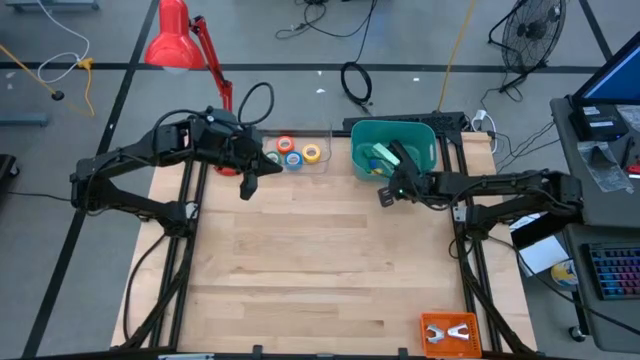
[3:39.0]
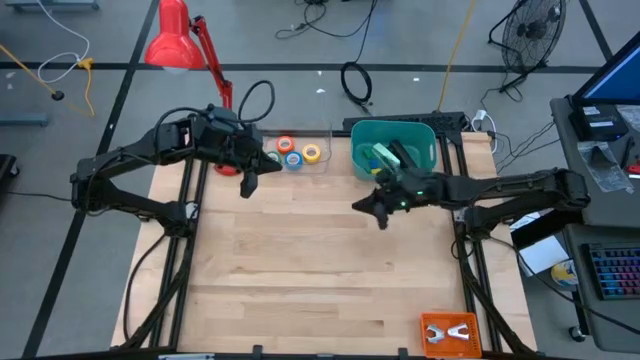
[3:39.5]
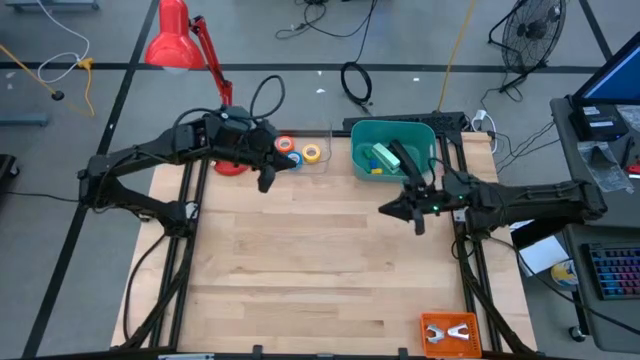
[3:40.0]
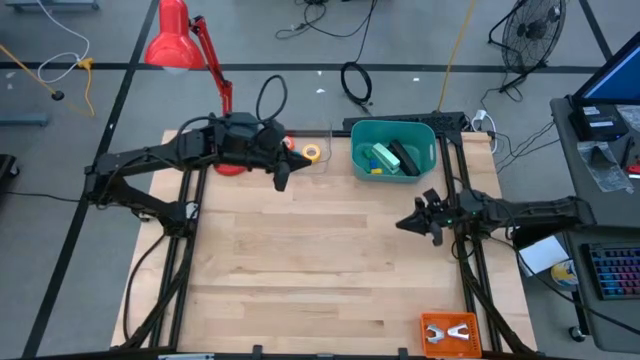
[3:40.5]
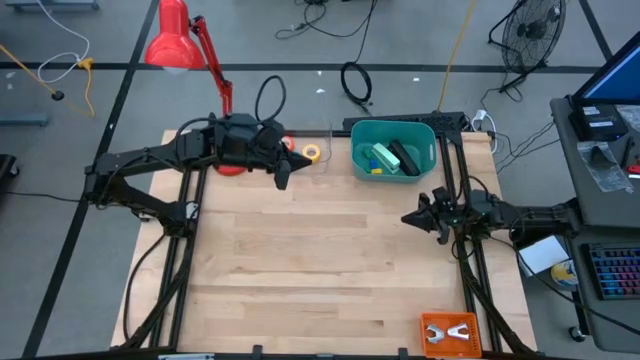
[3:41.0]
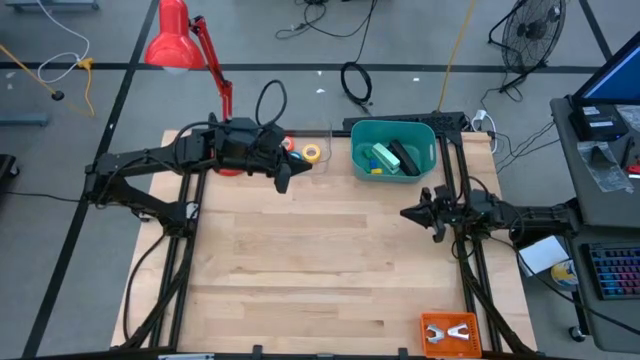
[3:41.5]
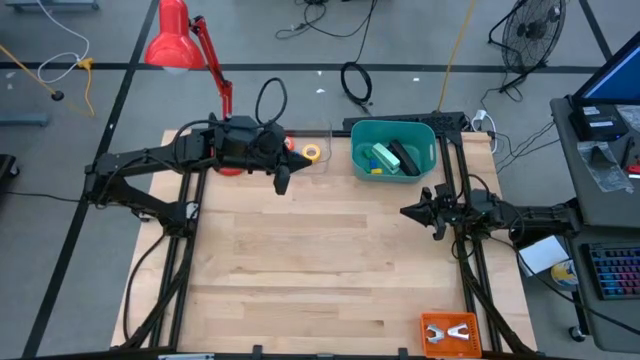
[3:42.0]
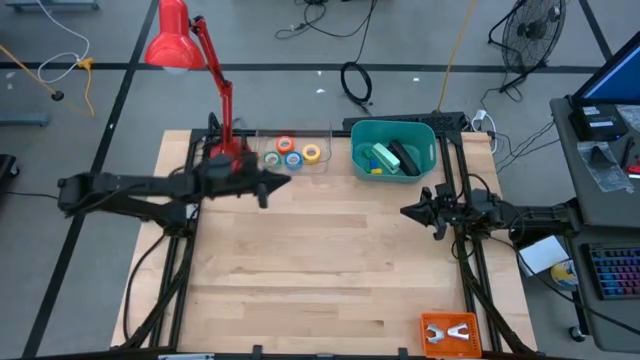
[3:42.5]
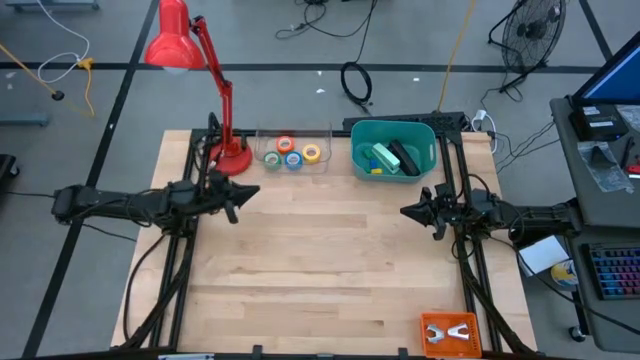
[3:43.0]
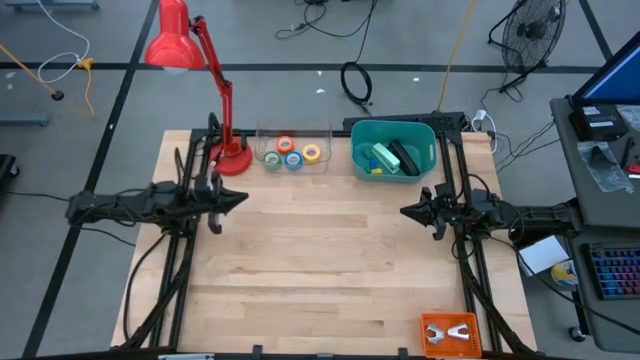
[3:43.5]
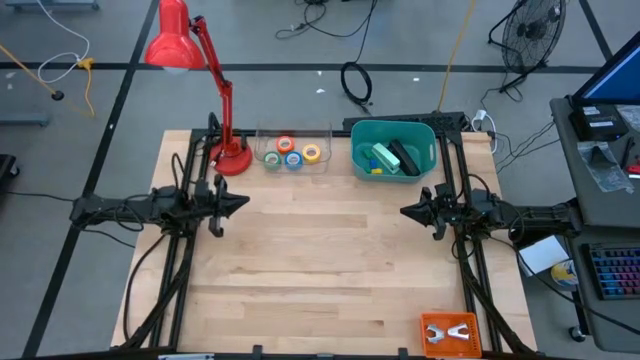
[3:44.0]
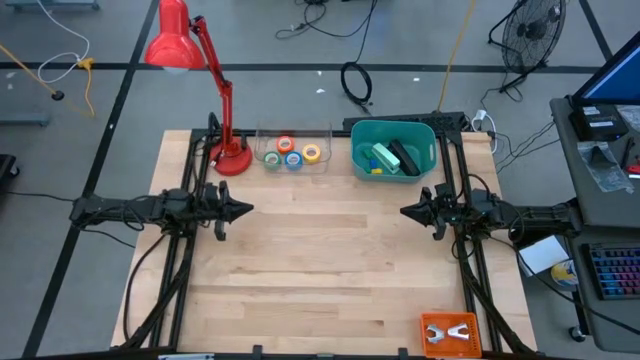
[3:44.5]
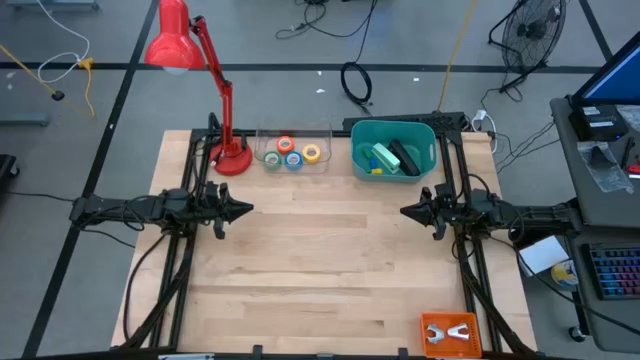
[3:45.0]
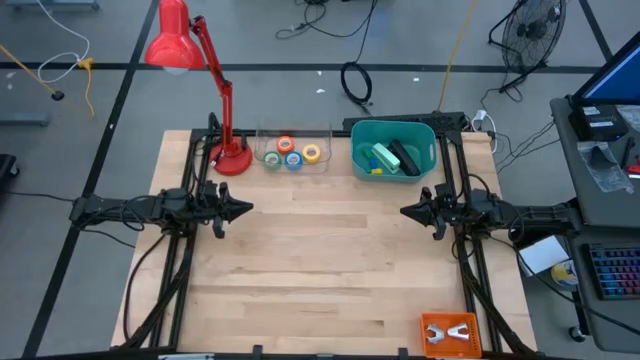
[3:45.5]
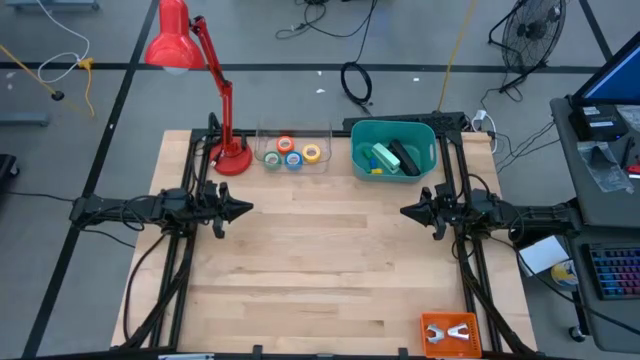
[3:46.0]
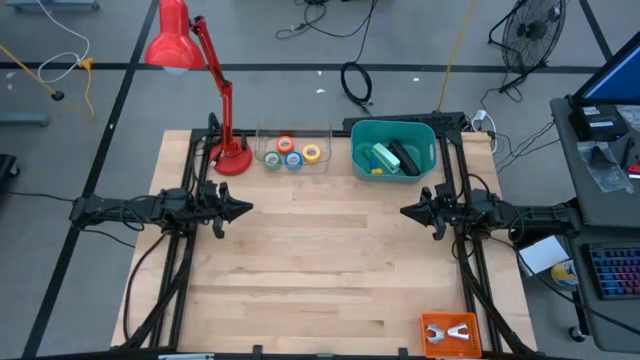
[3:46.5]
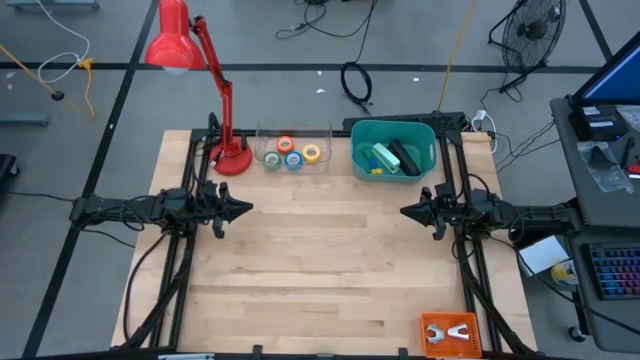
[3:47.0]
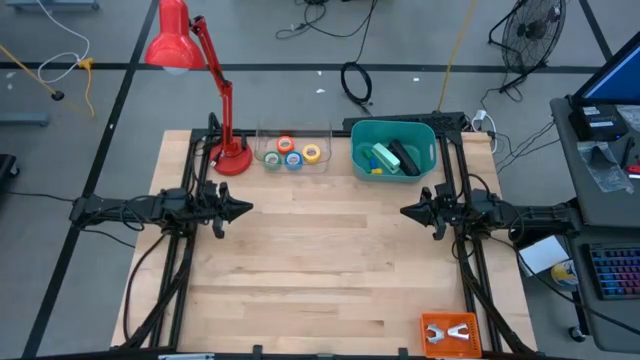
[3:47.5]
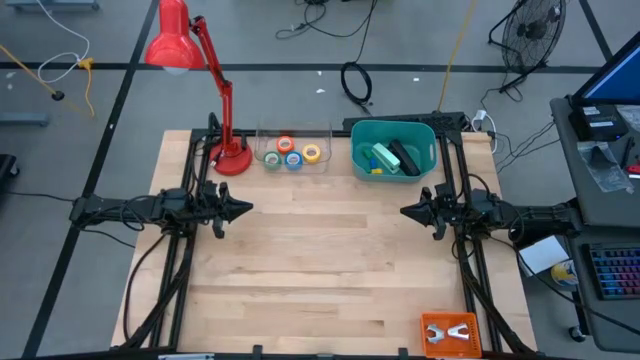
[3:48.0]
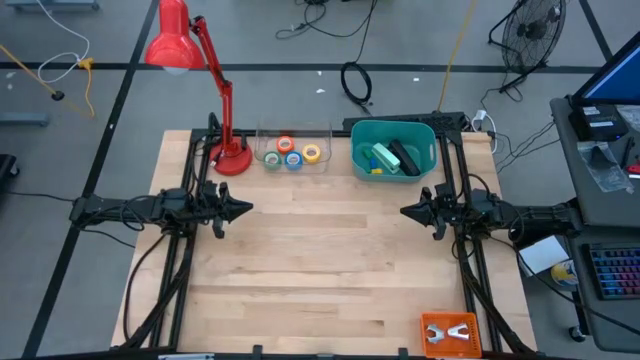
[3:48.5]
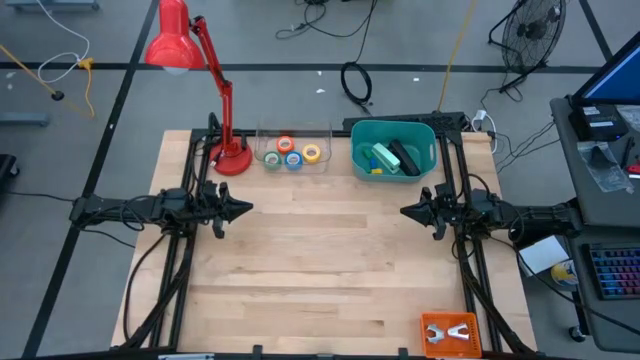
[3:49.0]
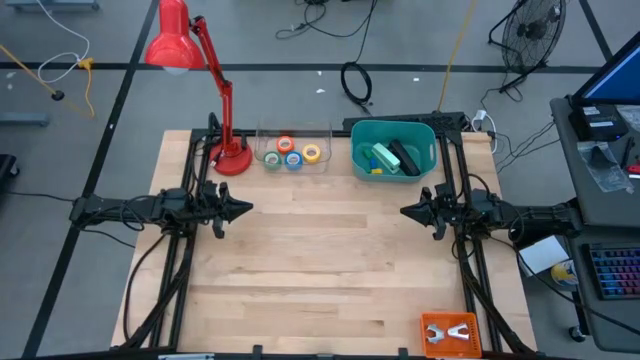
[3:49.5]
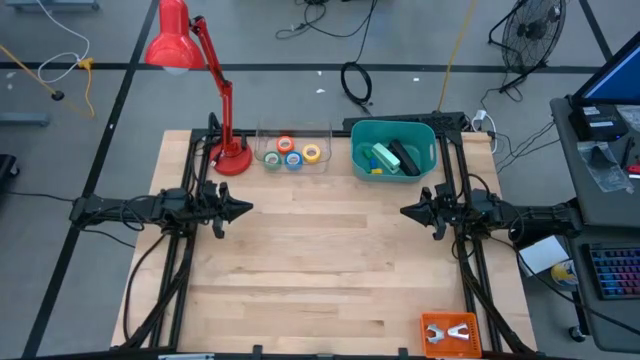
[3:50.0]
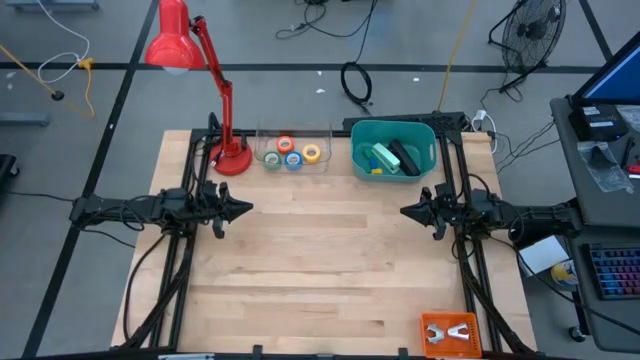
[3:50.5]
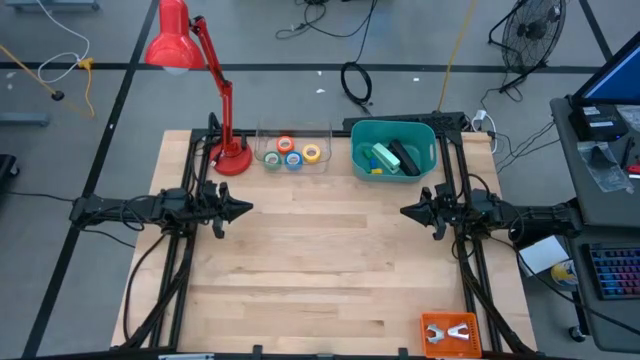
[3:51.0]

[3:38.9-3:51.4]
Task: Pick and place Stapler, Stapler remover, tape
Return to Home Position

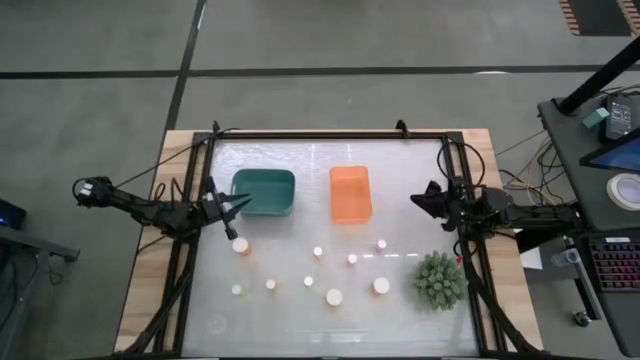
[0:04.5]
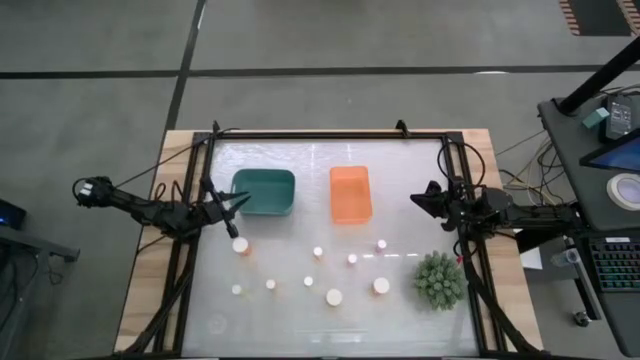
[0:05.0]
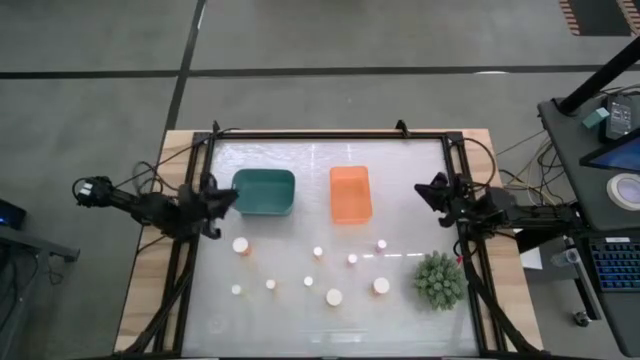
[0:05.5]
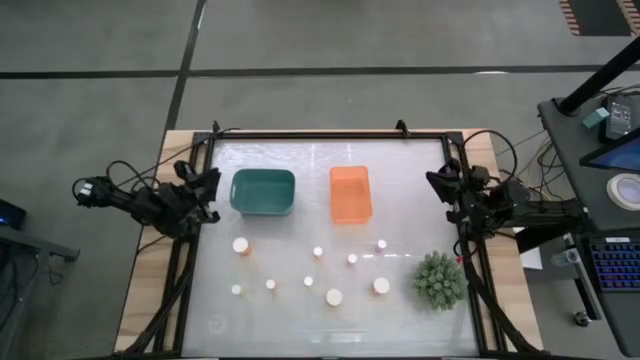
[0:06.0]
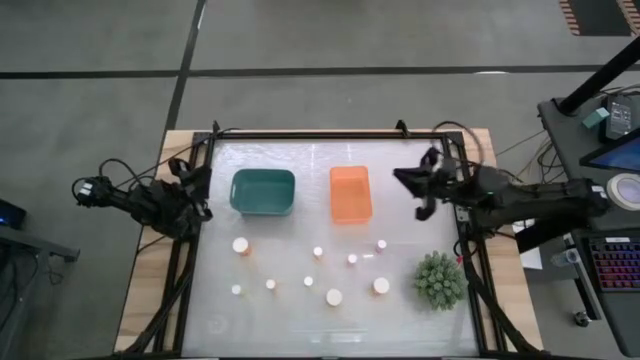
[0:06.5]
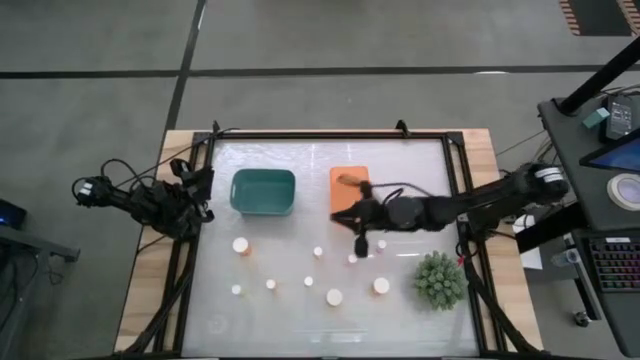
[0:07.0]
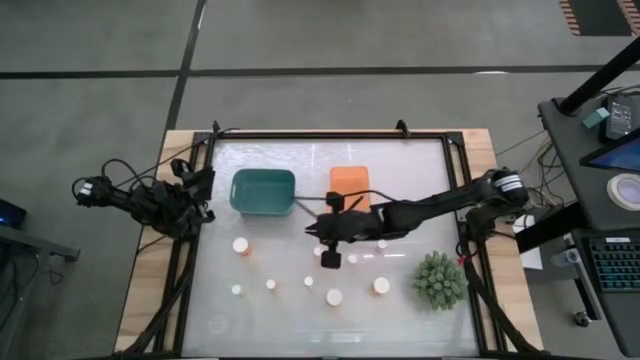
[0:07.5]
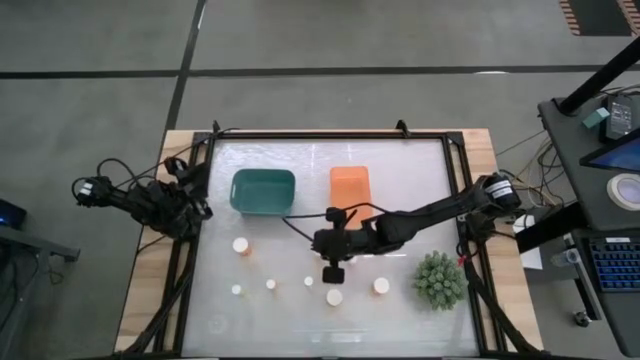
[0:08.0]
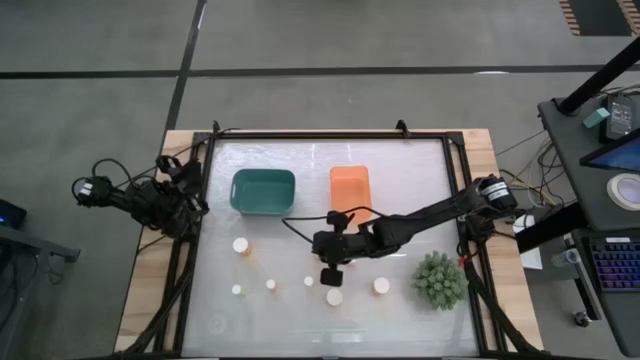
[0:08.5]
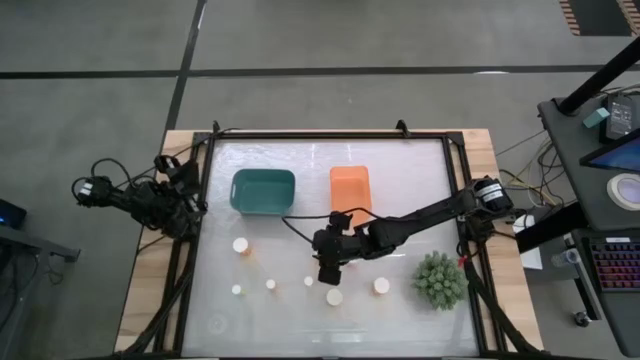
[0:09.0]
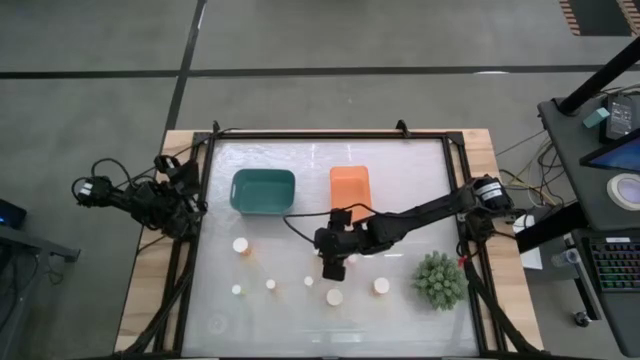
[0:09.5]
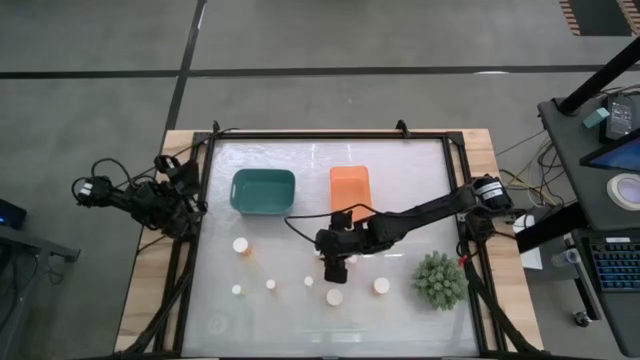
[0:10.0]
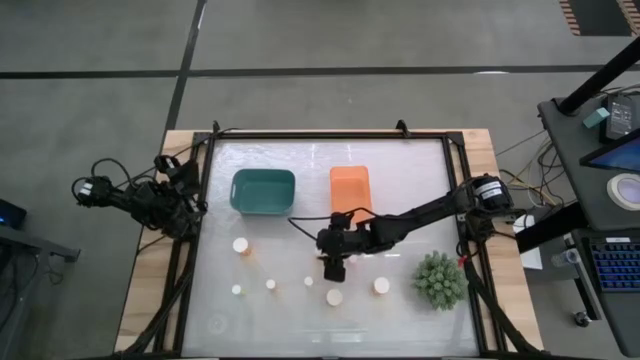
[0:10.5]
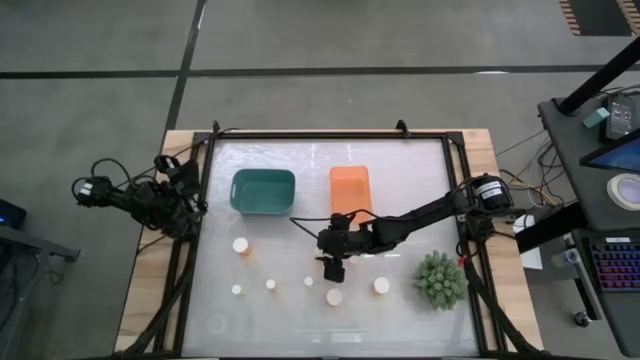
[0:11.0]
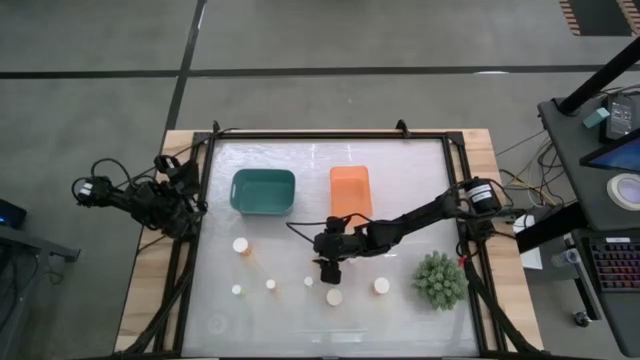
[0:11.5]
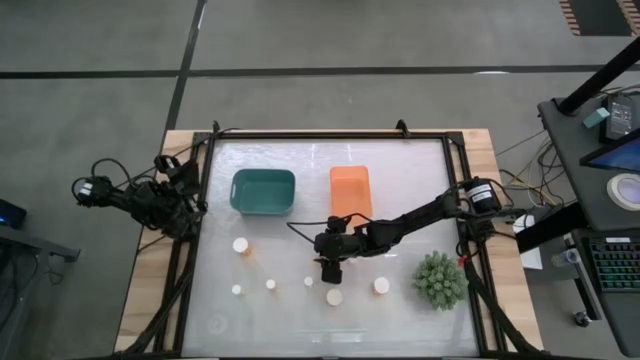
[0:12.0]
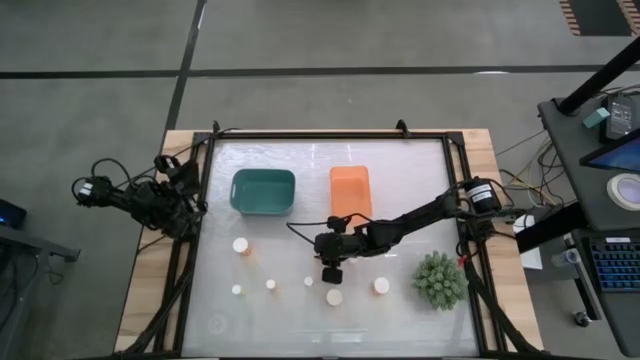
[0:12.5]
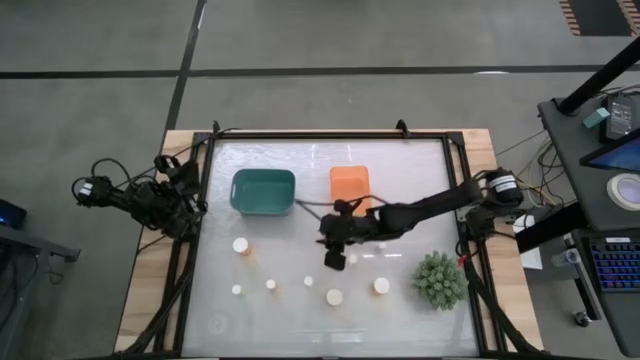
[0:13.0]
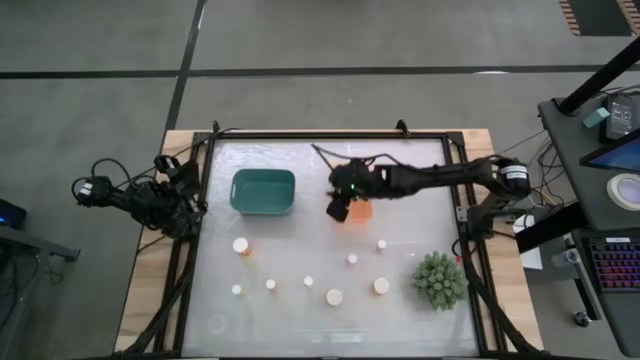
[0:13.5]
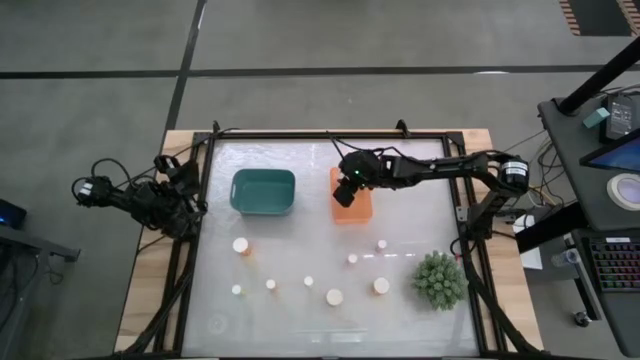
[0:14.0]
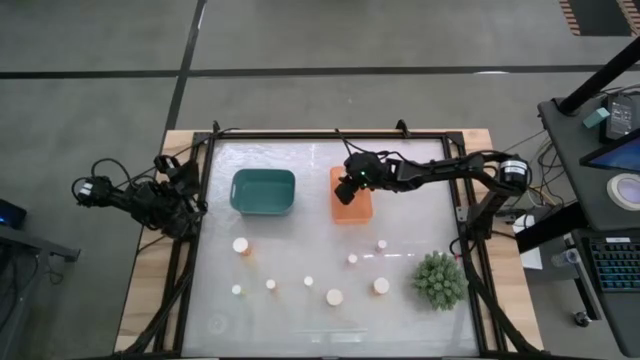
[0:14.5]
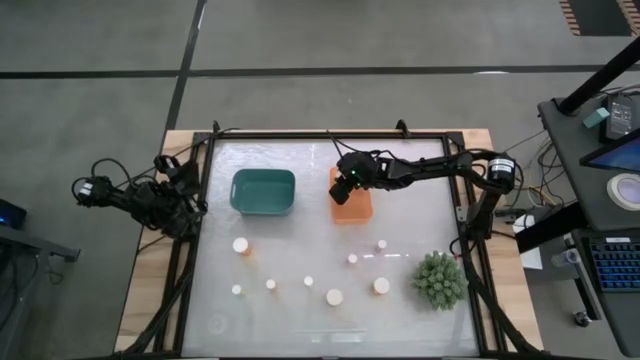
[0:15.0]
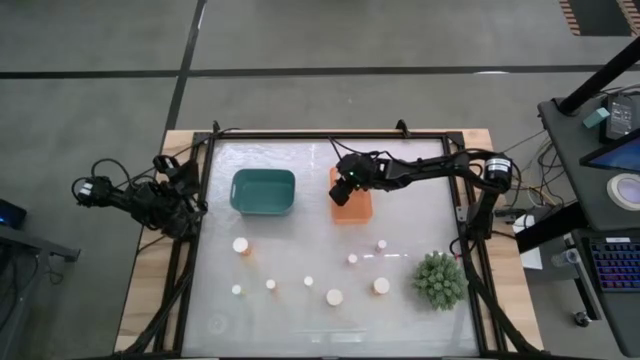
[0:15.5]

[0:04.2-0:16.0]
Task: Pick and place medicine bottles into bin by pill shape (circle, oval)
Put the top small orange pill bottle into the orange bin
